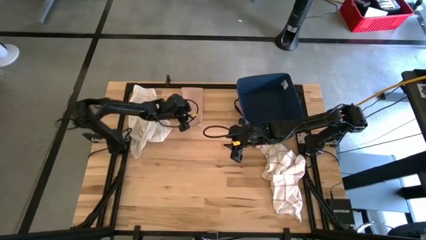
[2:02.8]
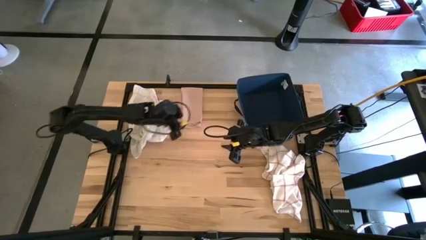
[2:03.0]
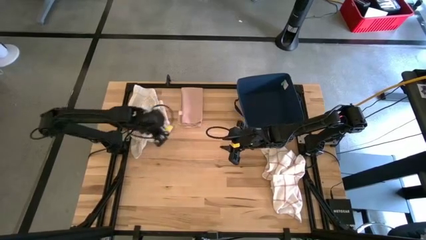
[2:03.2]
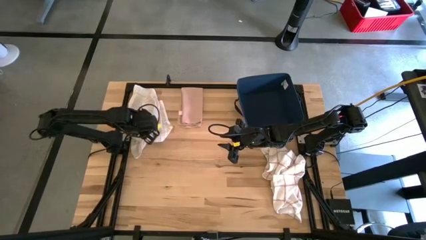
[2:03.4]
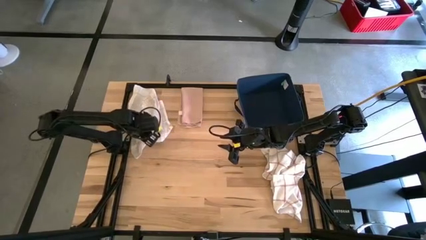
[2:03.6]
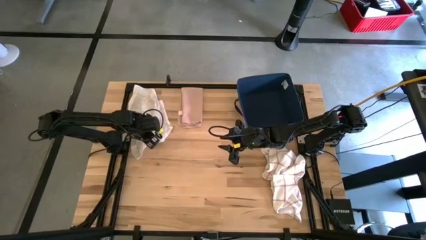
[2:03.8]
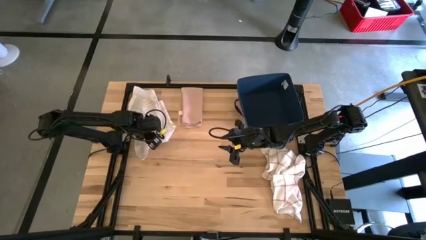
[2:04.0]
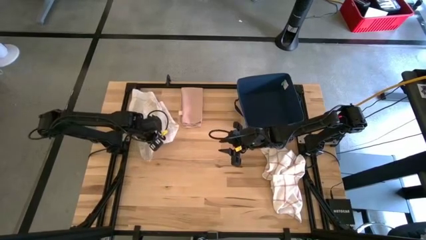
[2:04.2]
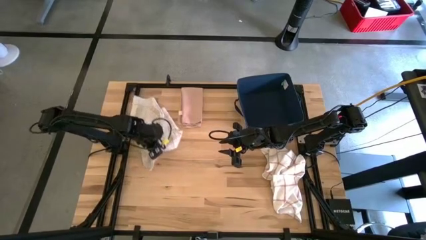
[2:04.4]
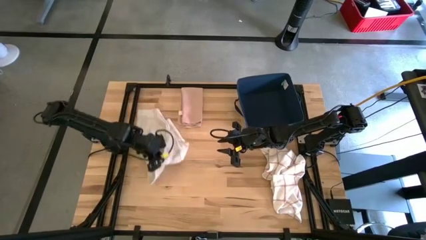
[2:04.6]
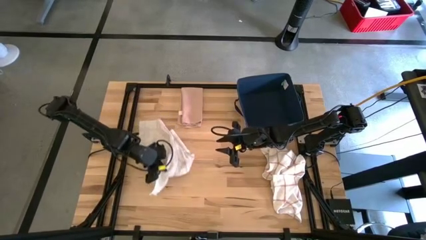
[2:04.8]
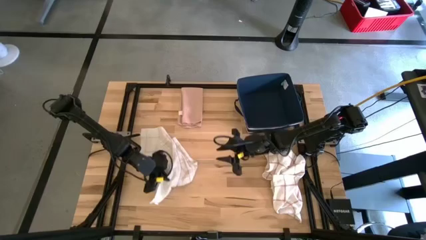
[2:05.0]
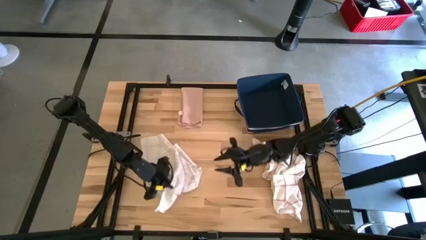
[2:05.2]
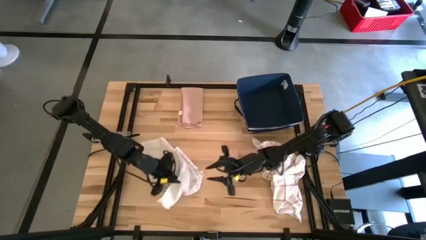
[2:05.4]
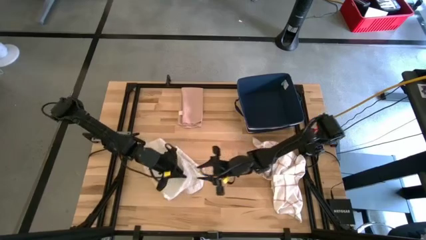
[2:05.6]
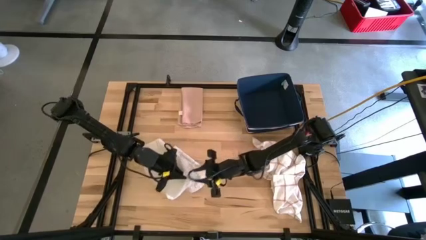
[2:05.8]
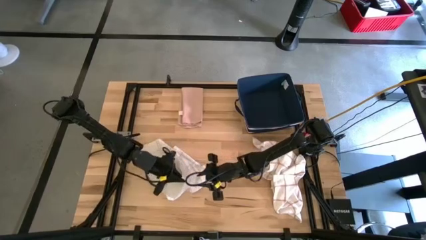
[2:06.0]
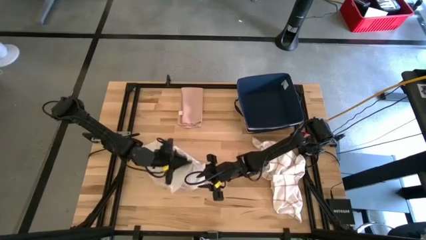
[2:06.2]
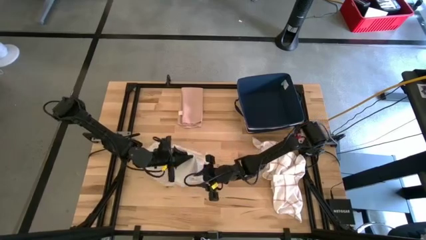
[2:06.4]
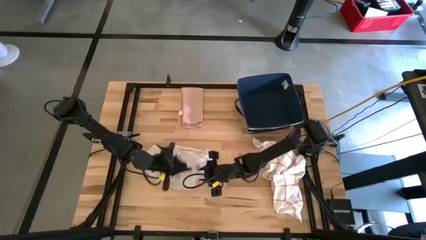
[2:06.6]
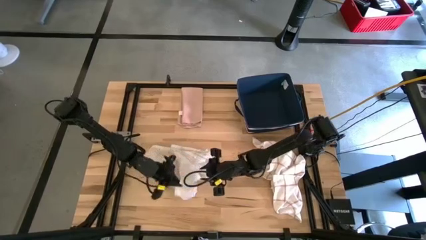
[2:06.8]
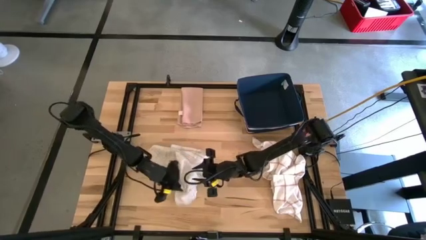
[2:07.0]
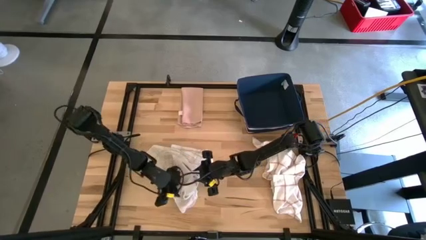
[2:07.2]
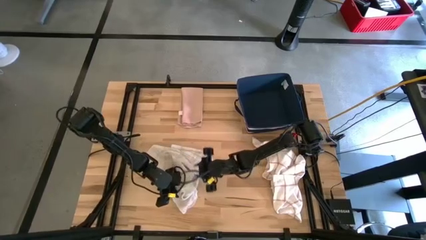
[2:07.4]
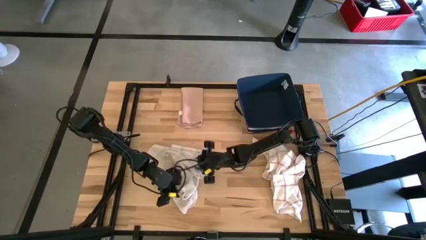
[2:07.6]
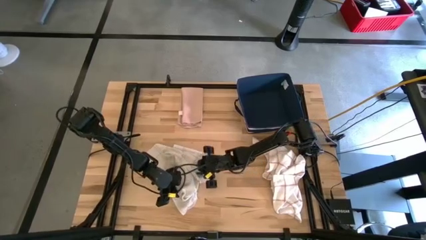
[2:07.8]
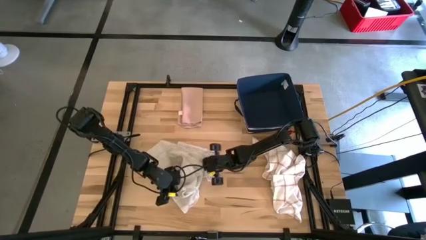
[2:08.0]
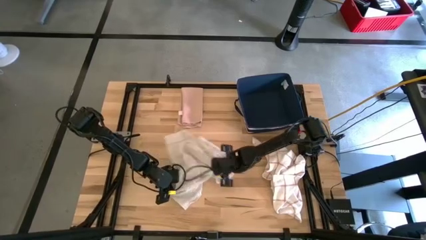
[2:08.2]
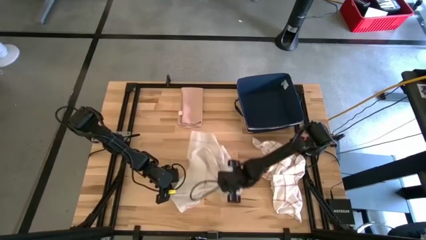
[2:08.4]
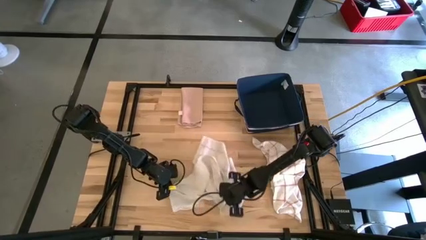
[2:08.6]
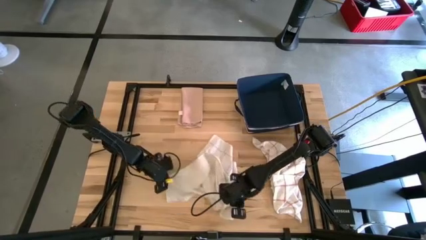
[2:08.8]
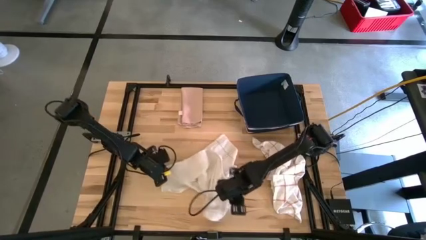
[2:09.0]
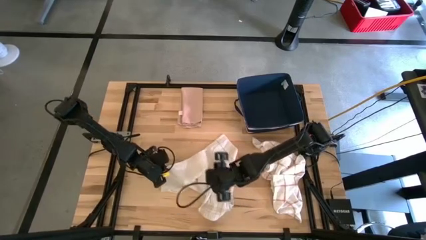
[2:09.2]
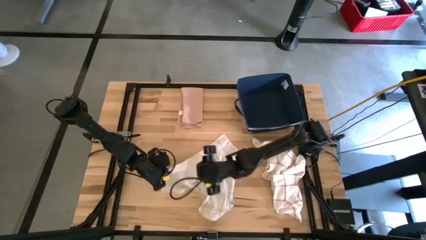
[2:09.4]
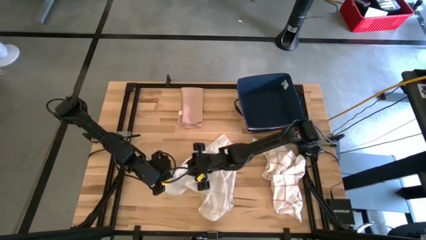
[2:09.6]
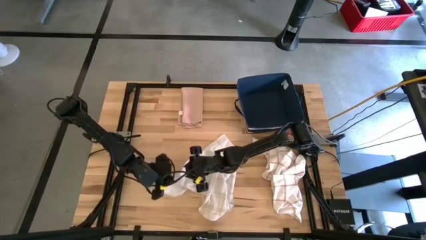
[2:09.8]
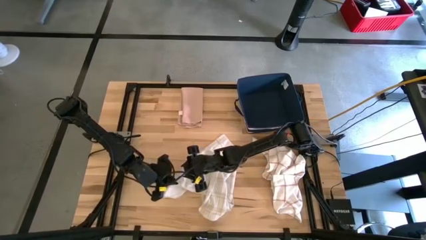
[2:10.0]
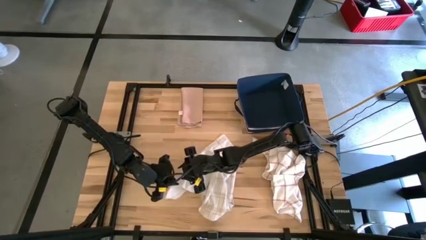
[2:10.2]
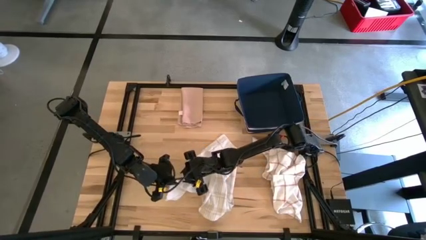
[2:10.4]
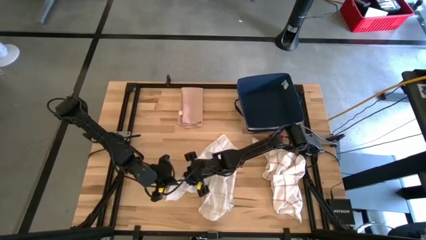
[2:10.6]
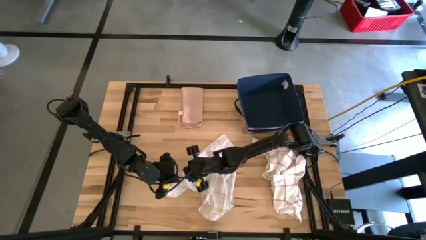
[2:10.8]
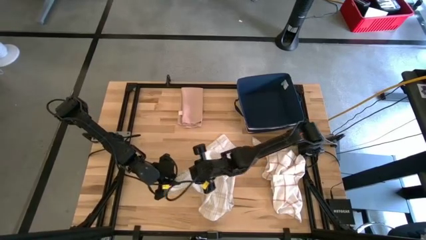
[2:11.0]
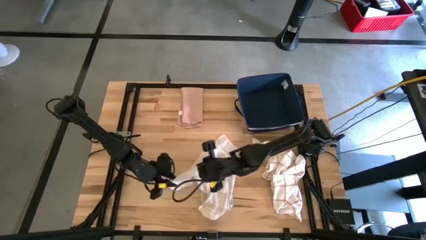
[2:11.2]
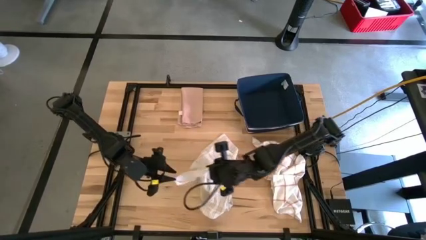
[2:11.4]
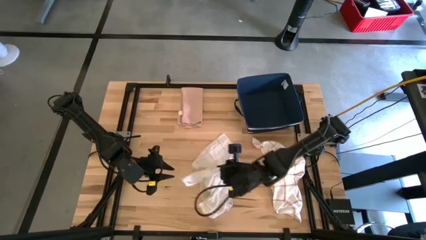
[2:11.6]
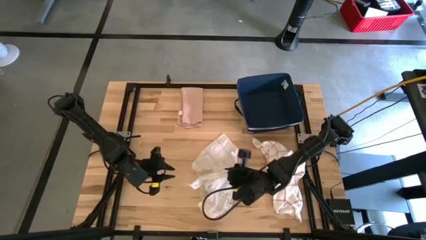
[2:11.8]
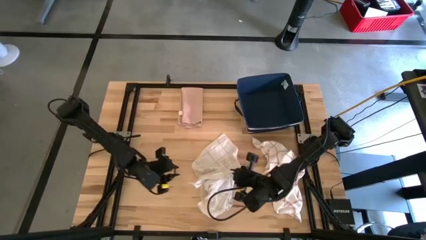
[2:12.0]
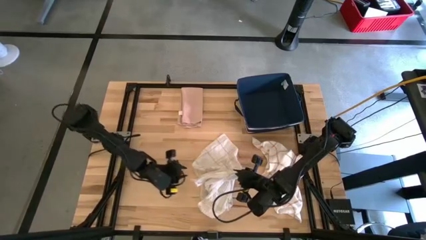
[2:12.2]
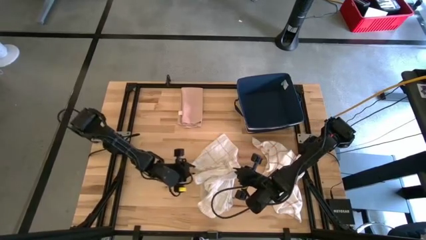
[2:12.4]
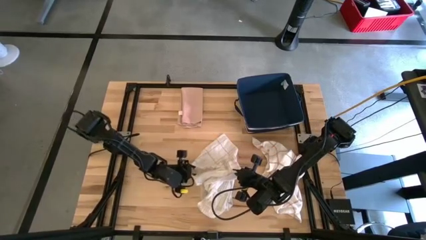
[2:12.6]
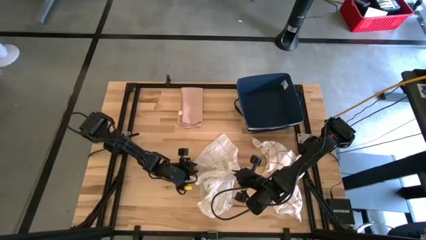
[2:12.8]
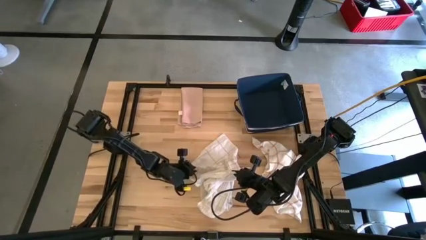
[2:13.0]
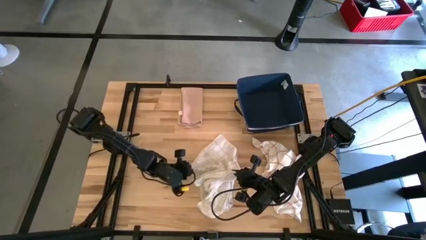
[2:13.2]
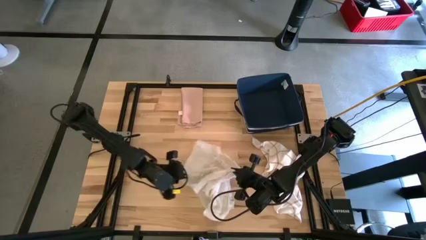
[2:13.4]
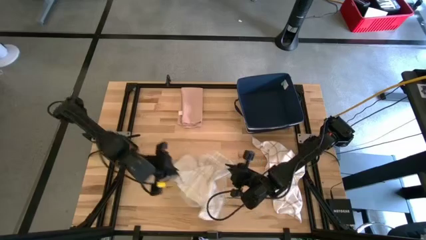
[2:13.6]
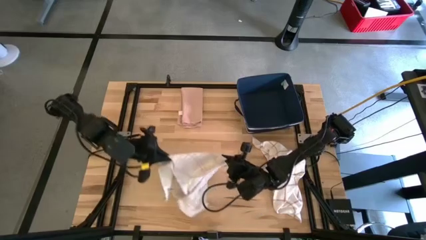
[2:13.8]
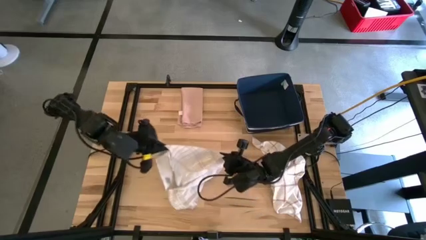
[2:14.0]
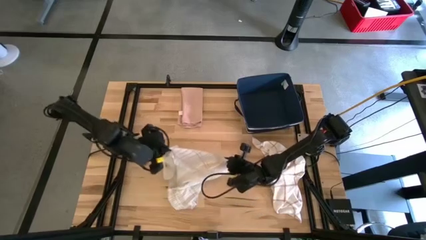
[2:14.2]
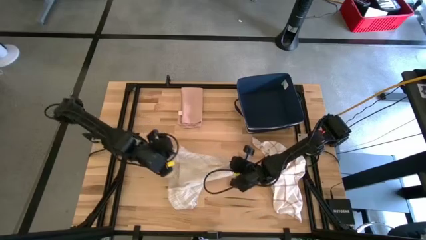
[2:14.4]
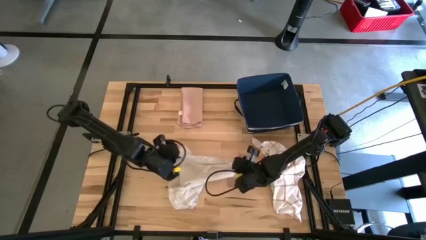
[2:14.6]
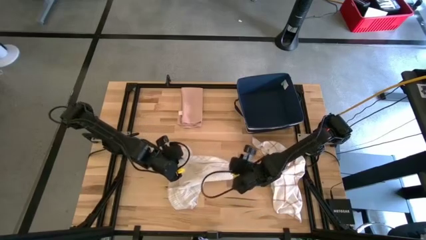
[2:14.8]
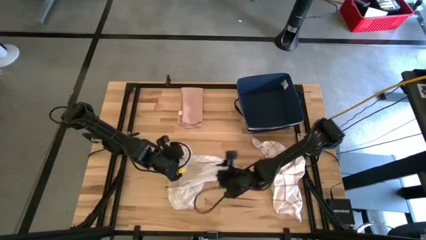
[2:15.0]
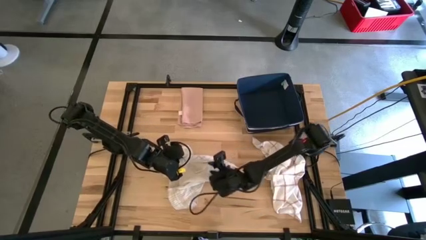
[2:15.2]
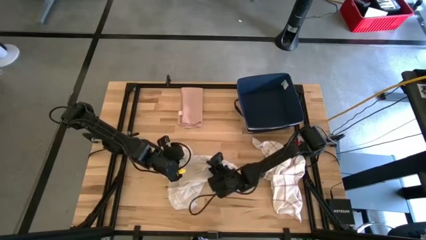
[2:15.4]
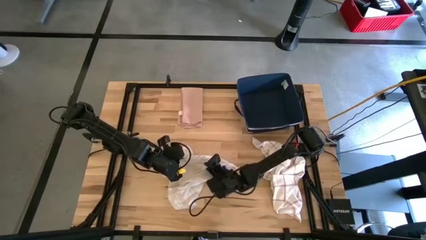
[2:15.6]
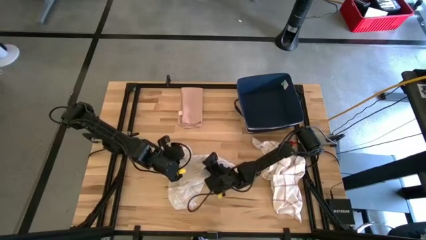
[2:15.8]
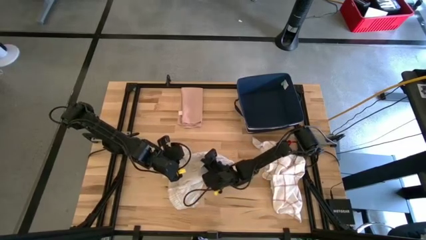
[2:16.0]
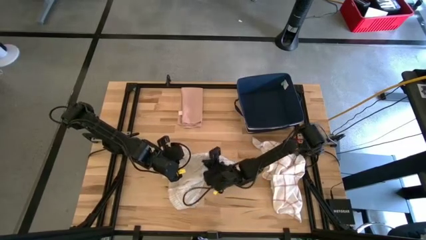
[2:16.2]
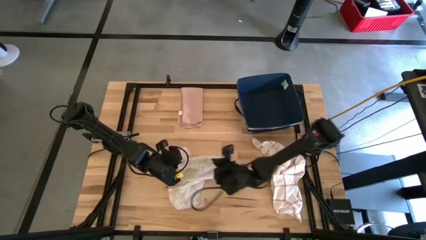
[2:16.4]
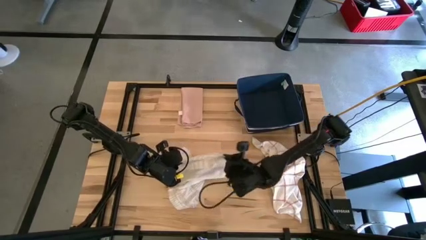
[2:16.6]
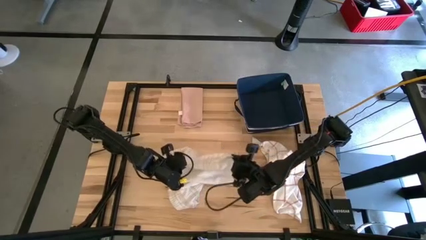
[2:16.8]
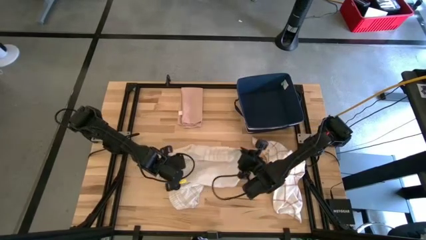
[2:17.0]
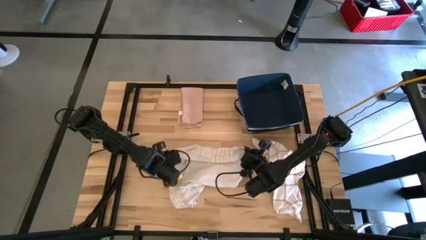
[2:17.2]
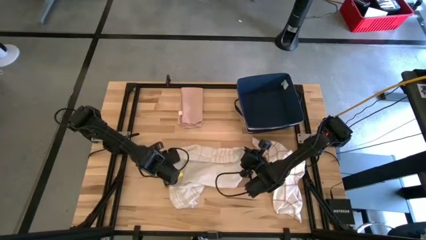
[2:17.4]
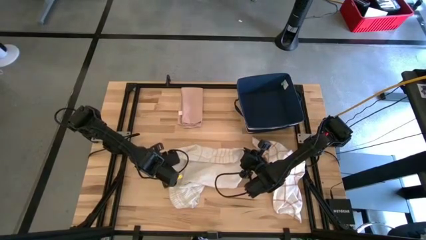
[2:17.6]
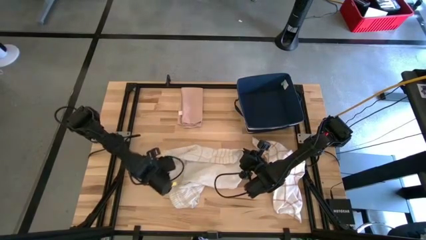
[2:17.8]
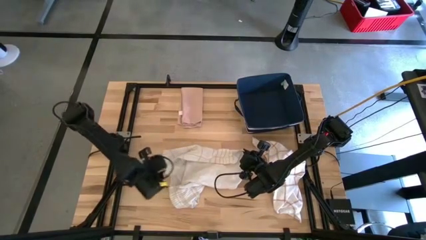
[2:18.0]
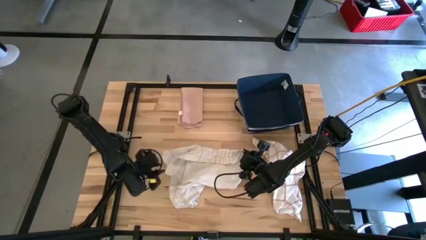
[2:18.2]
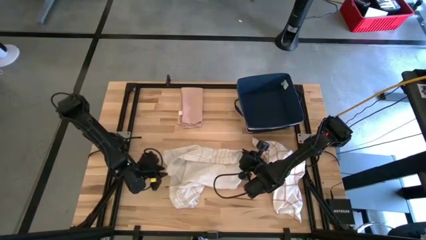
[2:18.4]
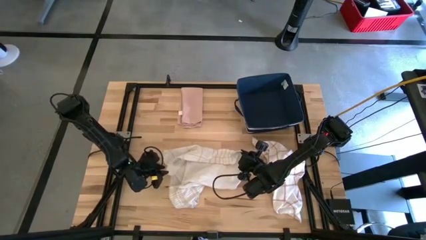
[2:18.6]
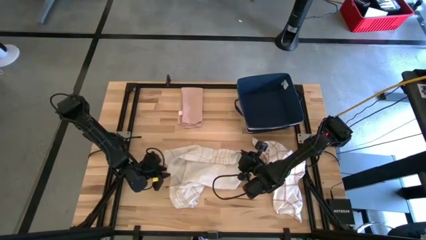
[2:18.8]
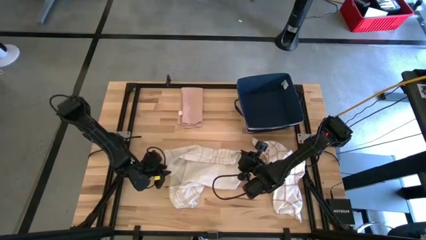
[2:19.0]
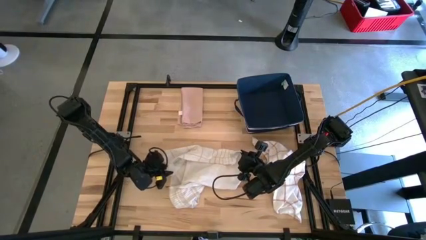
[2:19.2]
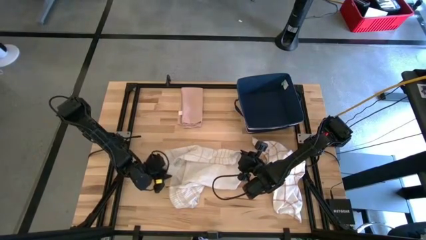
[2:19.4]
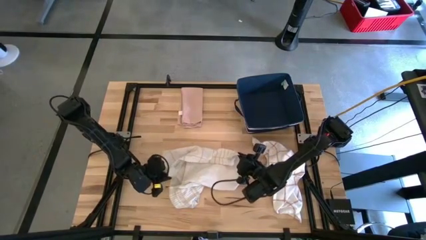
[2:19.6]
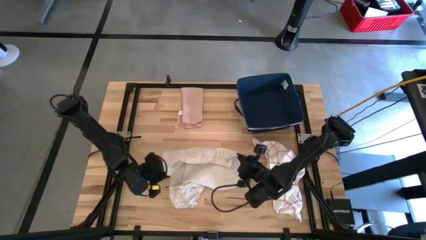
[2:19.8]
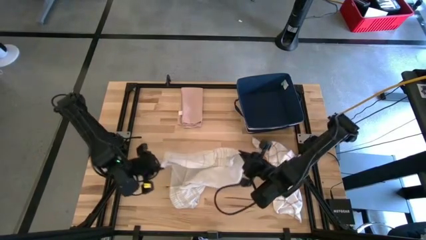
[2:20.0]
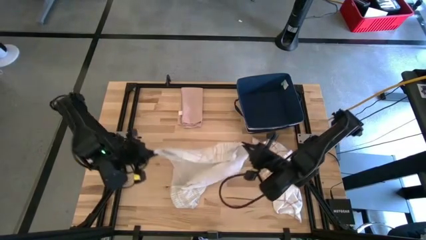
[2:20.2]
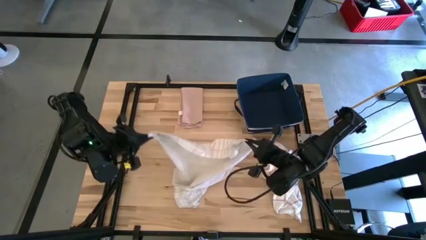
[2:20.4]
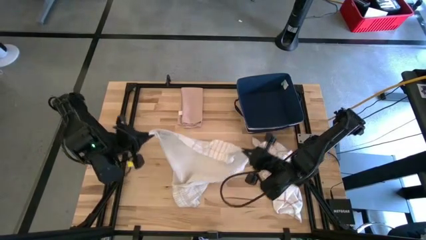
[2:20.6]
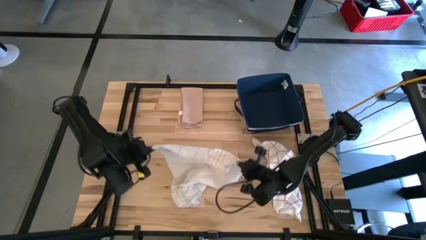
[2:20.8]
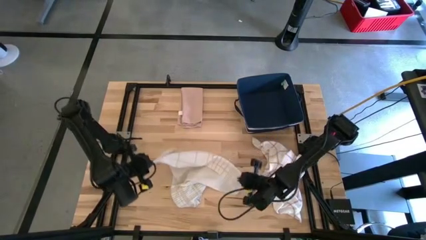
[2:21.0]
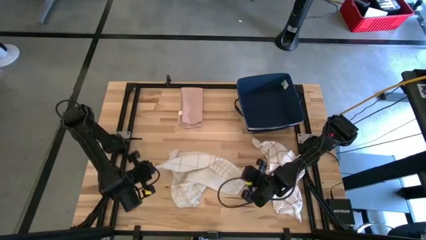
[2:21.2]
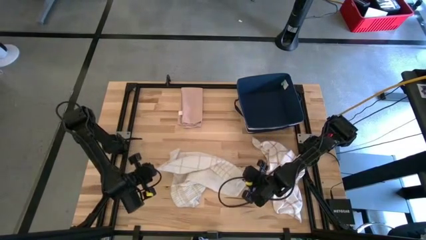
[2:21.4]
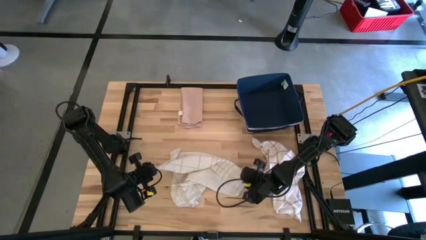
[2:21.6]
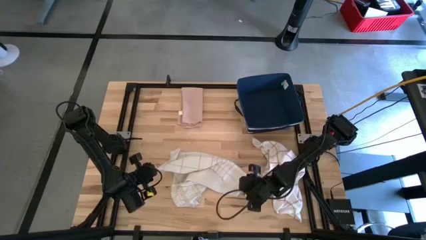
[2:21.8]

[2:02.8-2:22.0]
Task: Fold towel
Fold the white patterned towel
